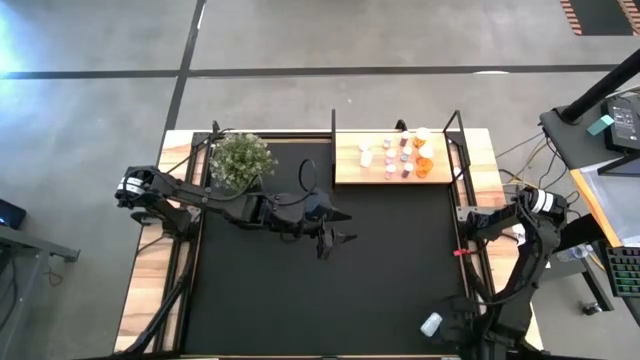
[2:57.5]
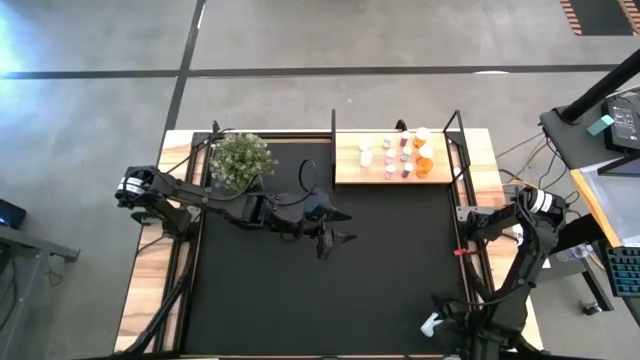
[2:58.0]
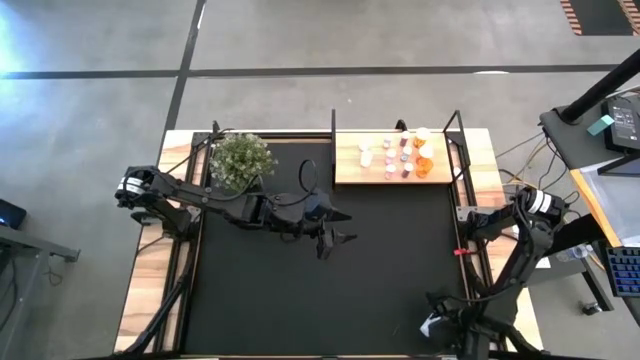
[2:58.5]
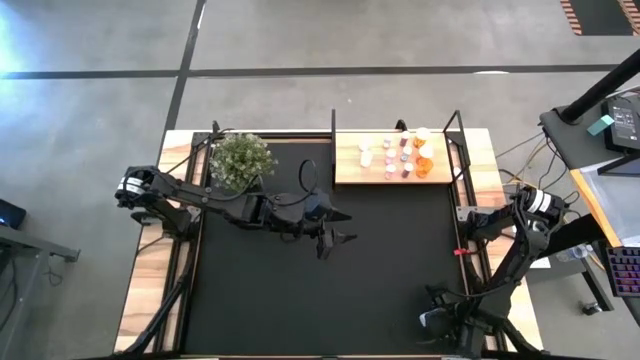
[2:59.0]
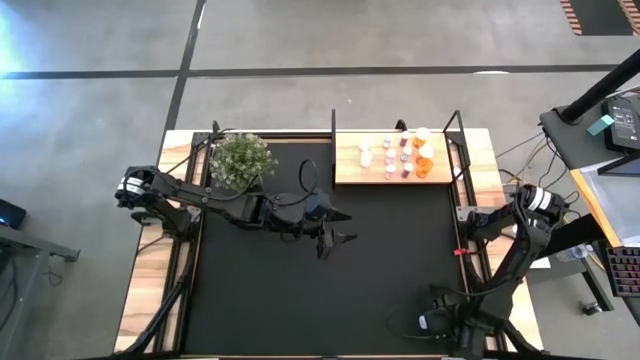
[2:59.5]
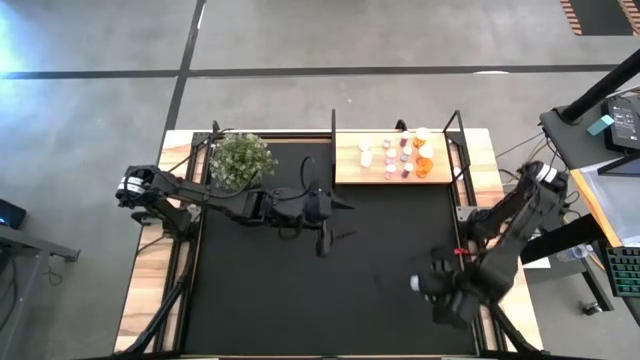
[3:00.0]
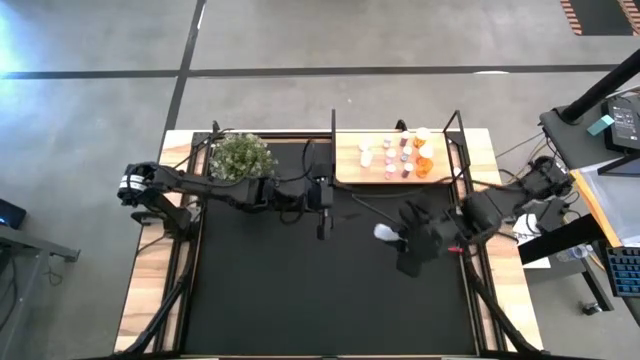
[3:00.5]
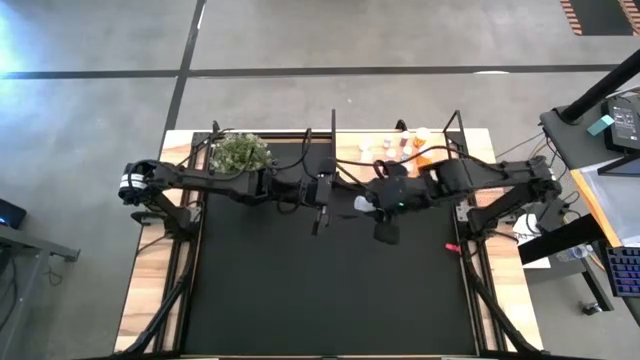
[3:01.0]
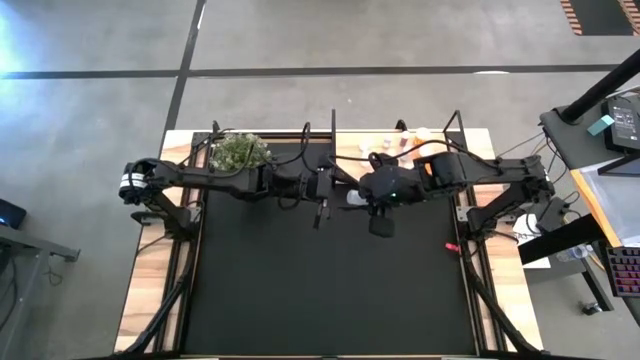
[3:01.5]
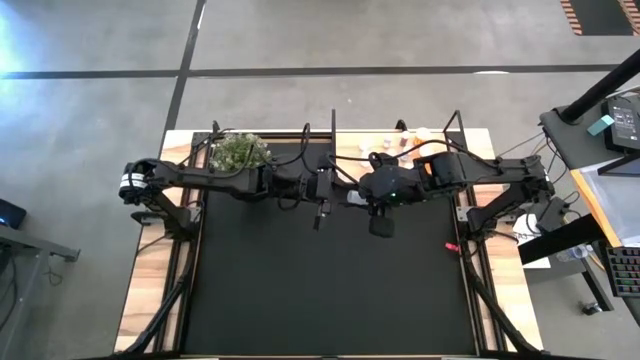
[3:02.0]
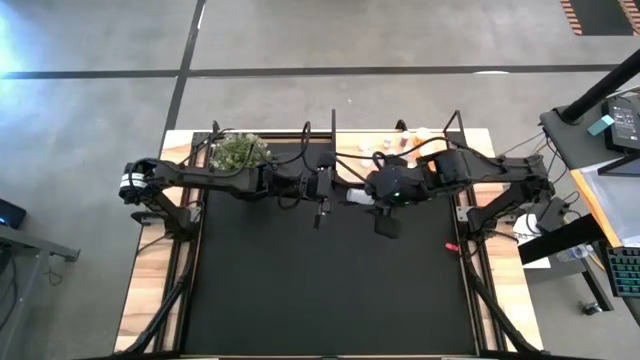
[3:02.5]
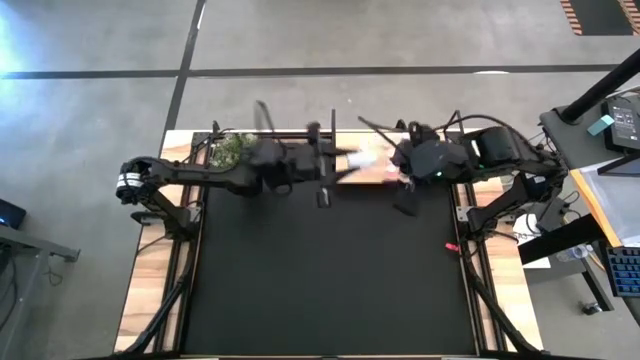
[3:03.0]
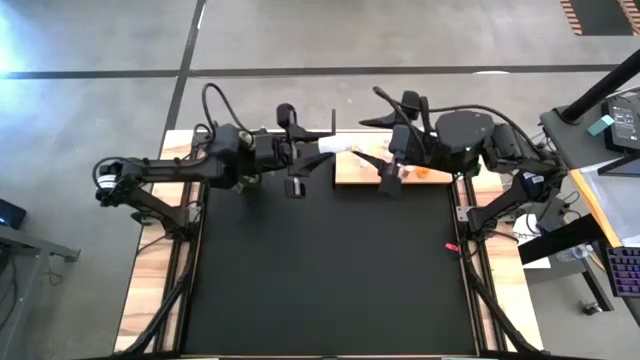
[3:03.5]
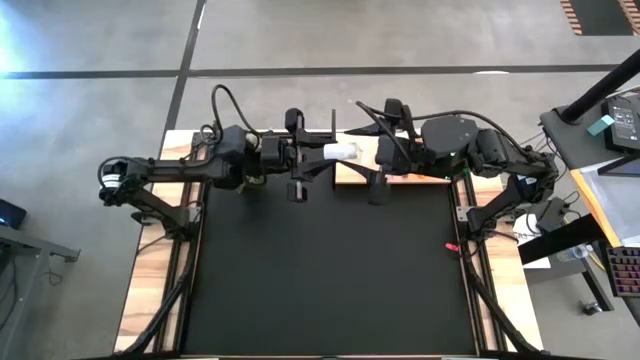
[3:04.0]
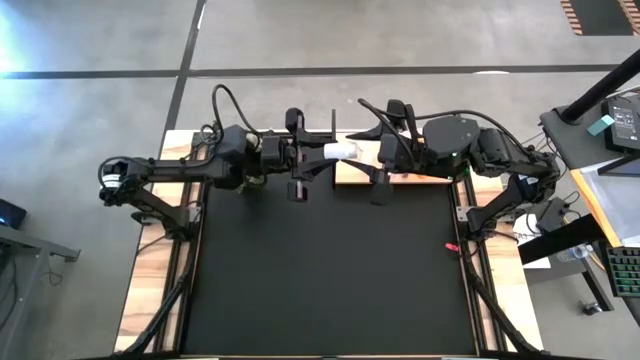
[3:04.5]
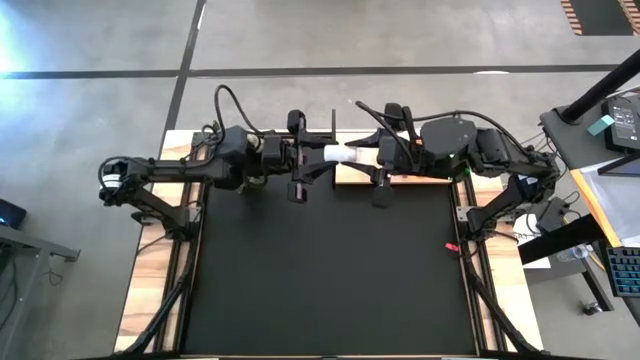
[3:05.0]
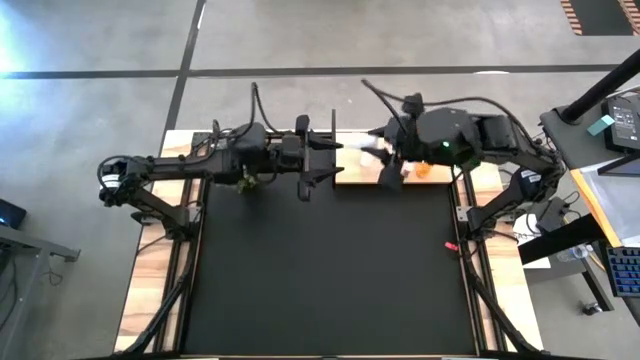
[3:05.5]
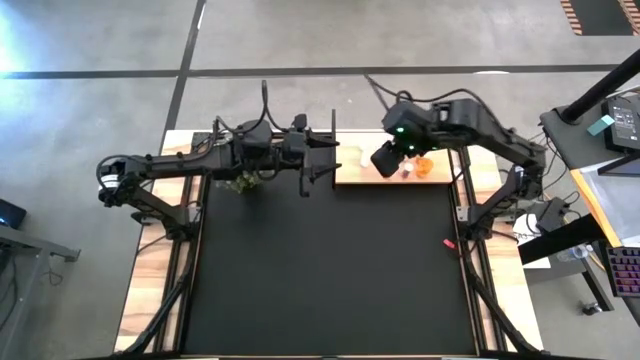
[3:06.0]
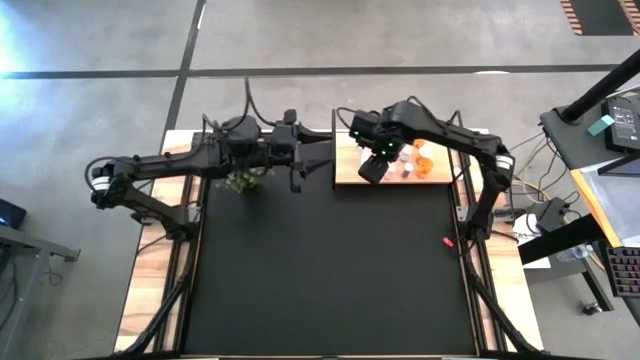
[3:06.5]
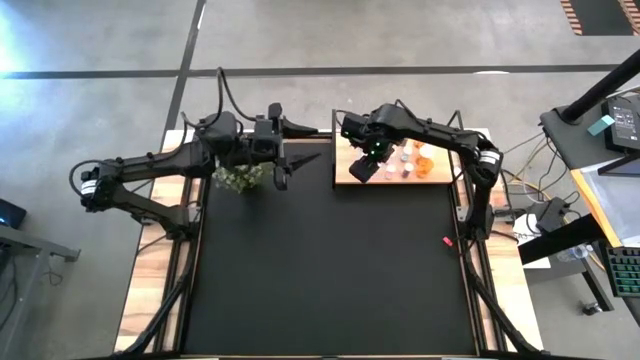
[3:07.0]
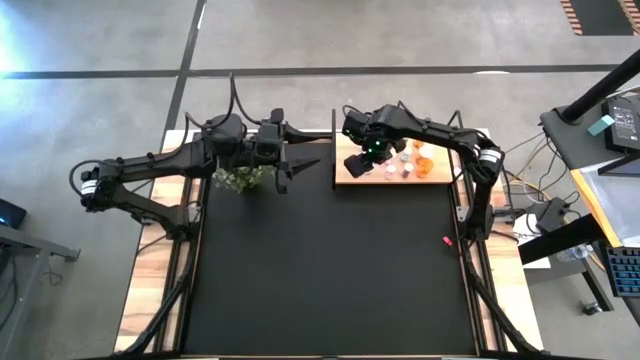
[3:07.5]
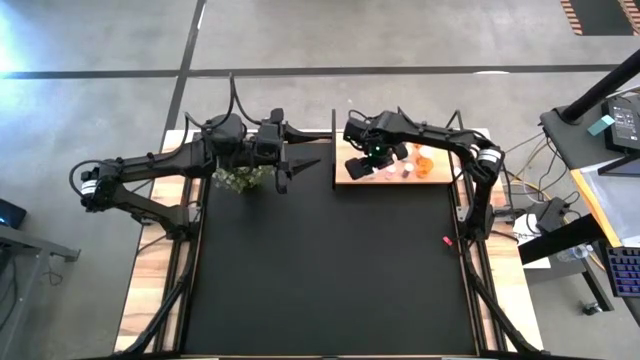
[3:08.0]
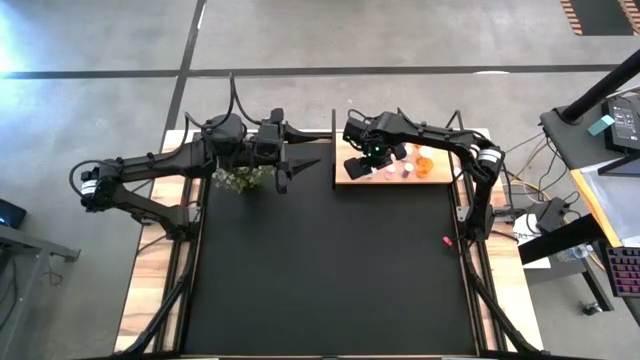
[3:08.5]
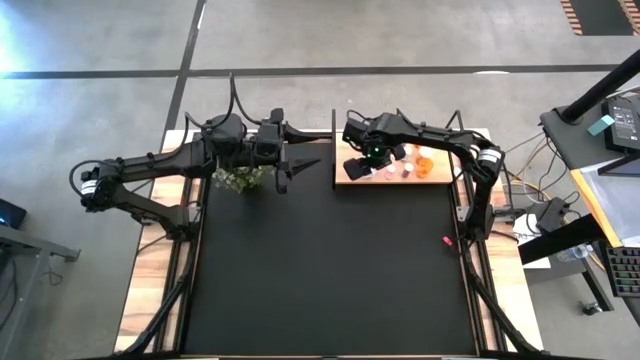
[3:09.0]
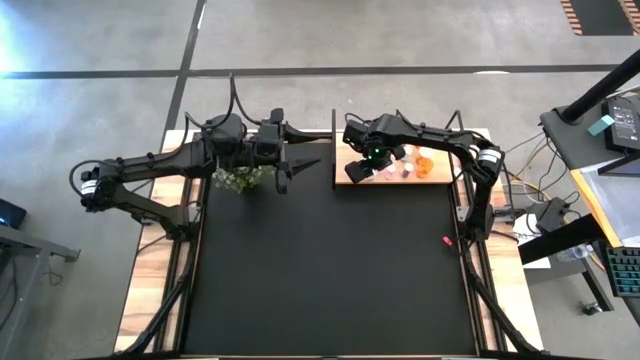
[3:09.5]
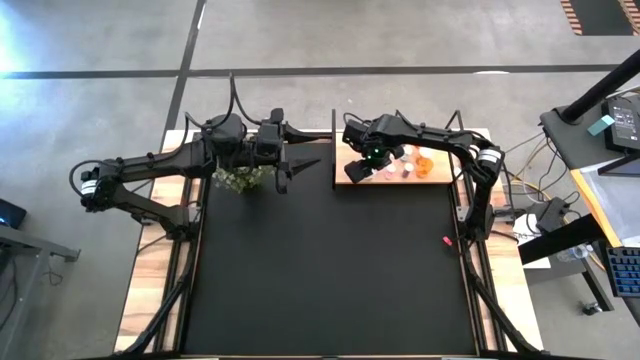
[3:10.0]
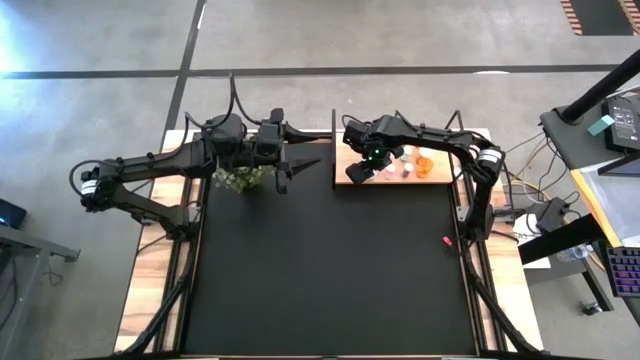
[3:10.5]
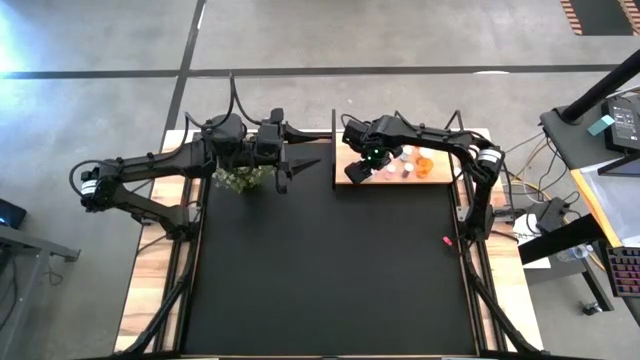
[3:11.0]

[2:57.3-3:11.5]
Task: Pick and place medicine bottles onto shelf by color
Put the white pill bottle on the shelf aligned with the other white pill bottles

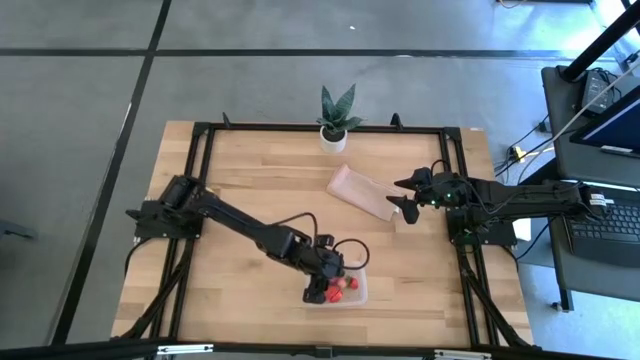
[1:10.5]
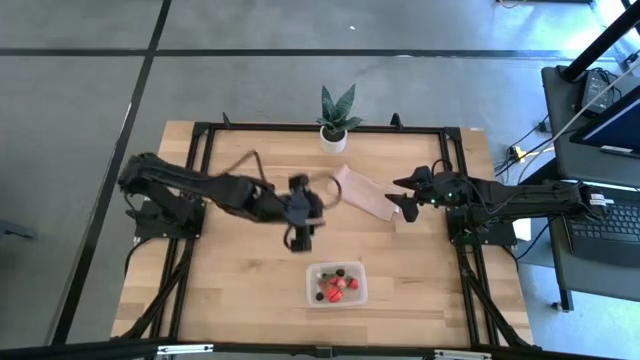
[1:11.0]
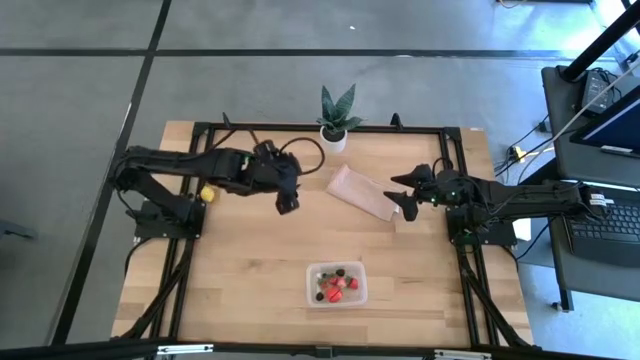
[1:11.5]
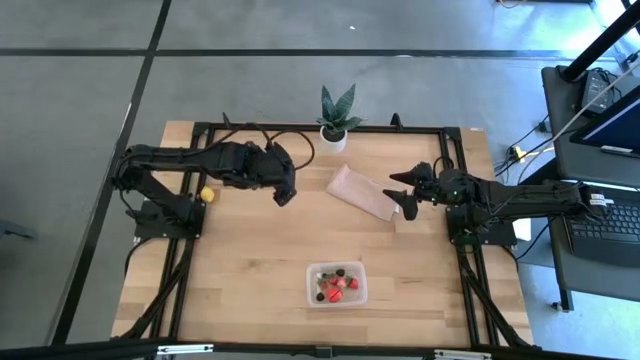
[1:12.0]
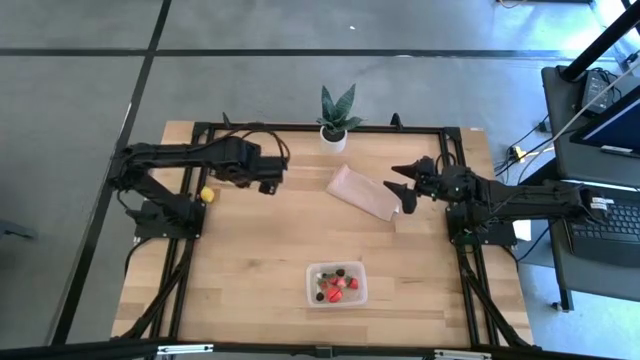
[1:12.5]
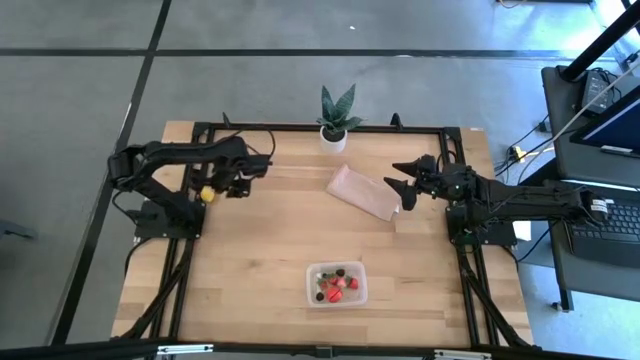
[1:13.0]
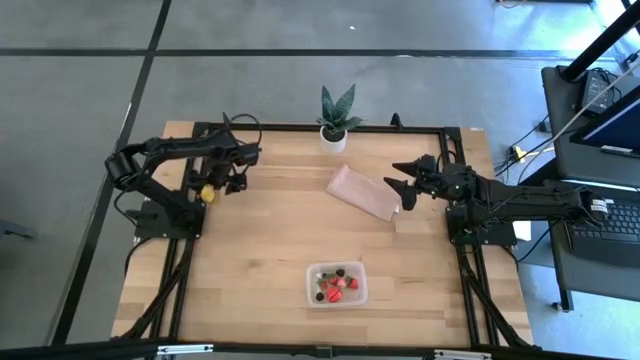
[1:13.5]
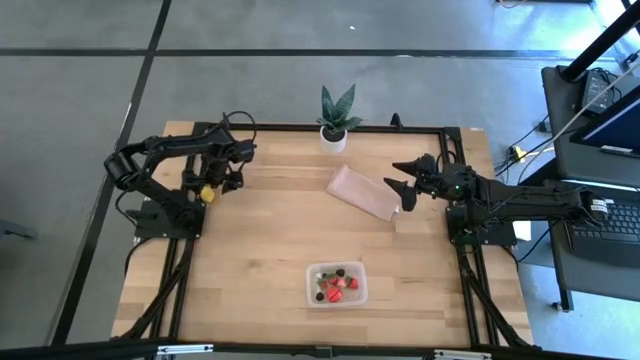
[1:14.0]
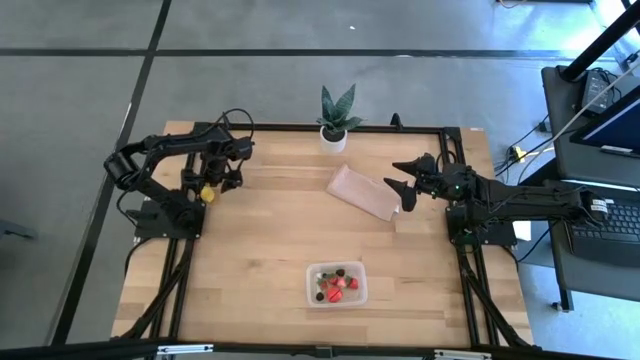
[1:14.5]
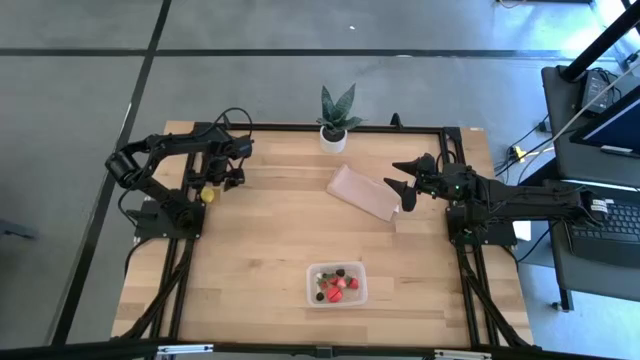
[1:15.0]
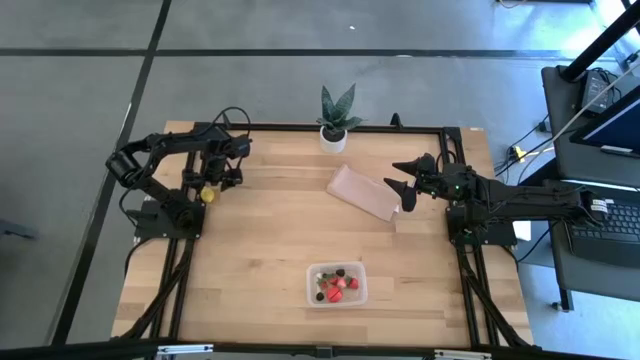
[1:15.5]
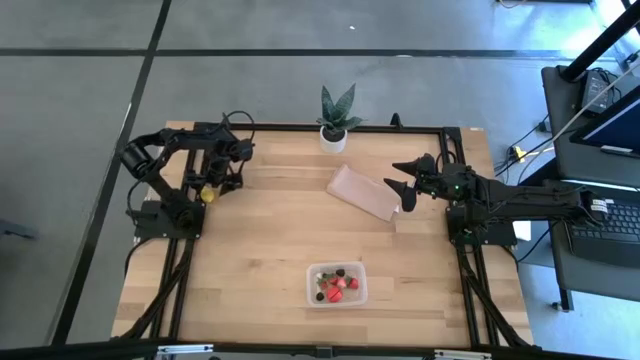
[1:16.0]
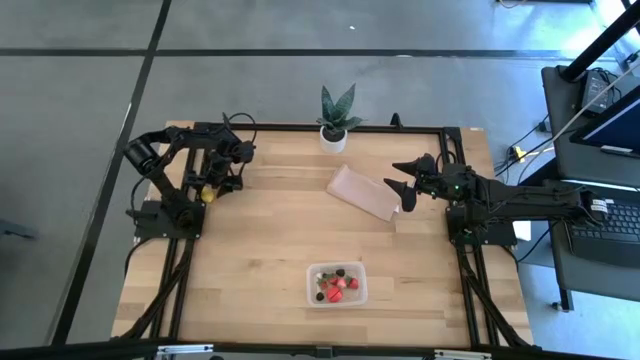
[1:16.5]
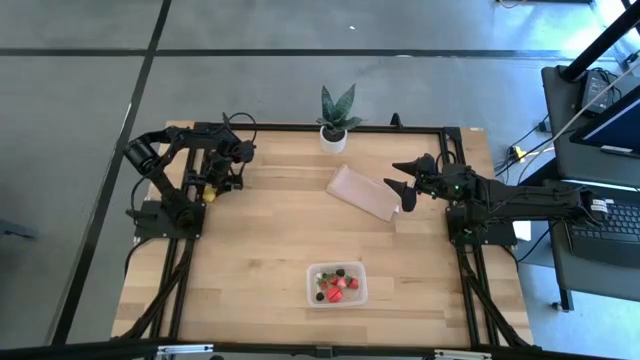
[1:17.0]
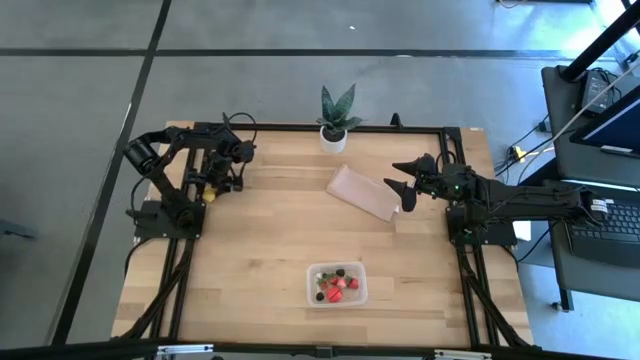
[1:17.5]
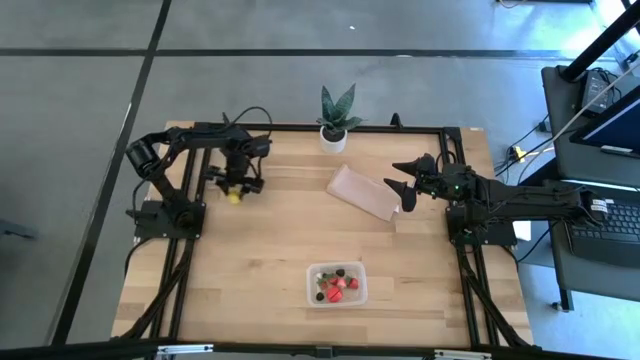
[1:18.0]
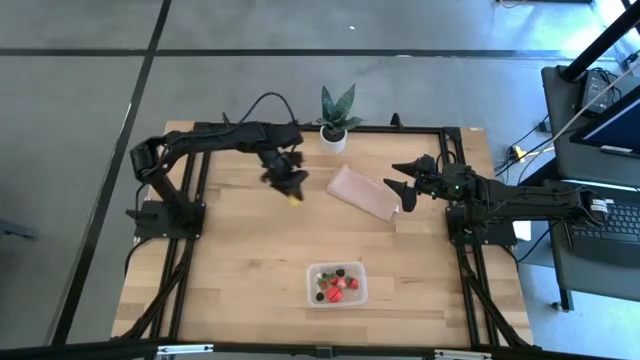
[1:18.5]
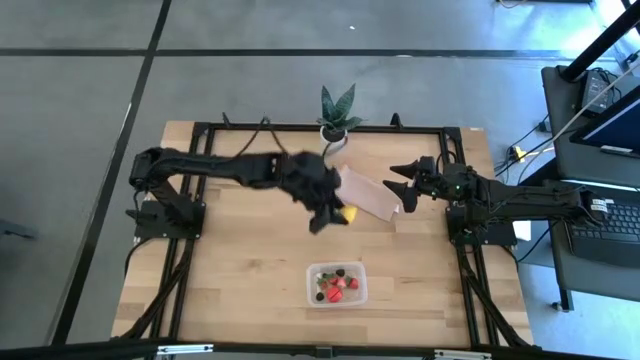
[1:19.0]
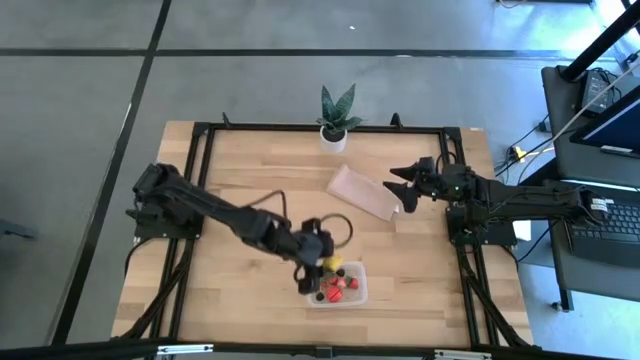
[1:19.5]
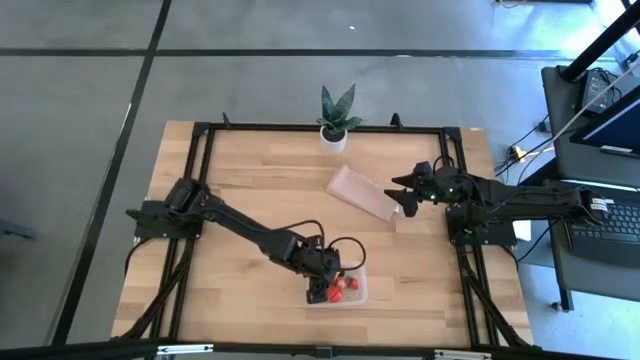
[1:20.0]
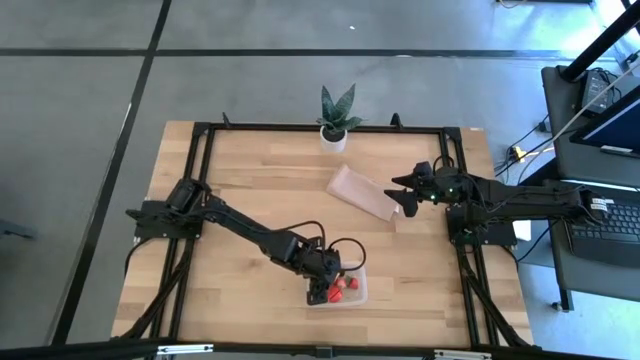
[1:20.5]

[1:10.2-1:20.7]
Task: Pick and placing Produce into tupperware
Put the yellow lemon in the bin
